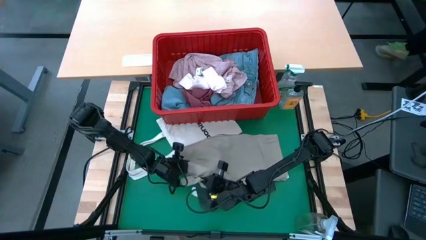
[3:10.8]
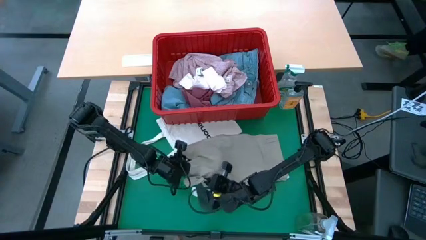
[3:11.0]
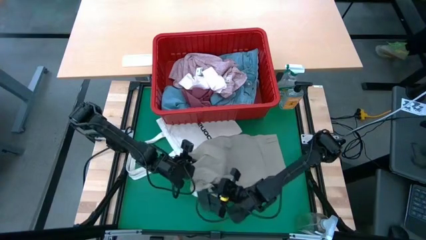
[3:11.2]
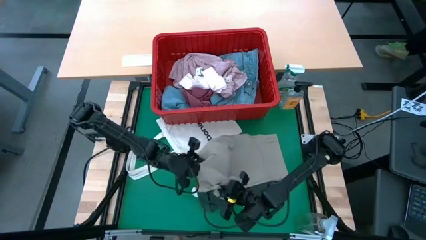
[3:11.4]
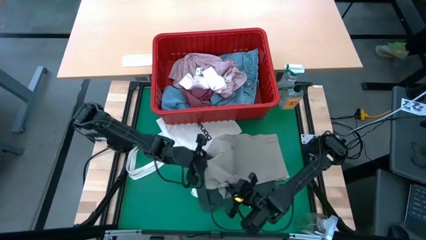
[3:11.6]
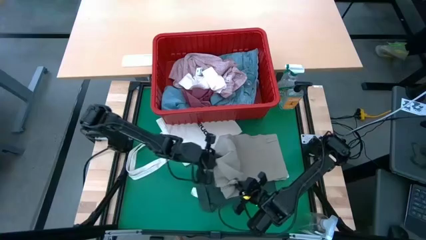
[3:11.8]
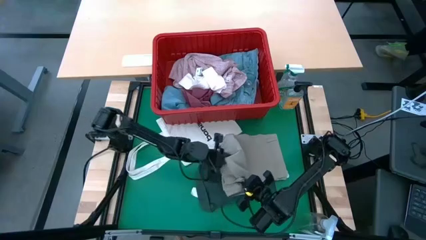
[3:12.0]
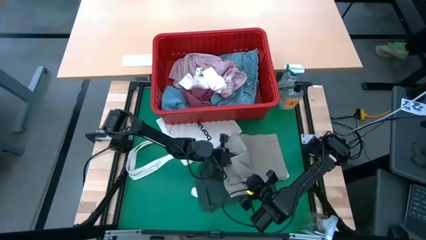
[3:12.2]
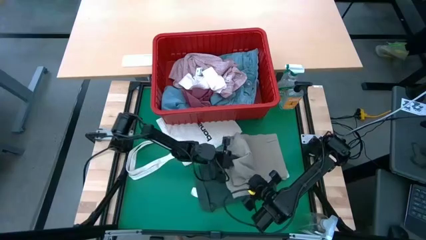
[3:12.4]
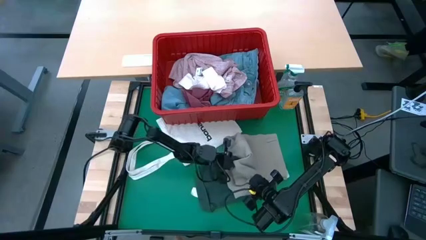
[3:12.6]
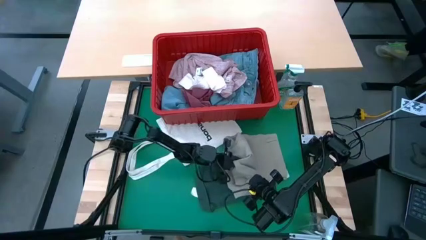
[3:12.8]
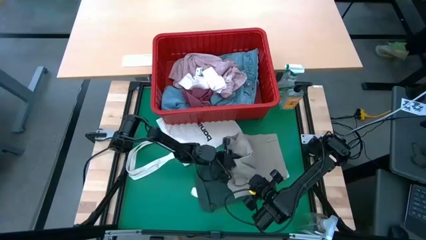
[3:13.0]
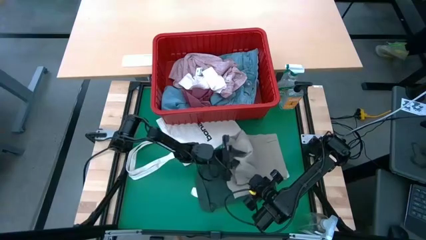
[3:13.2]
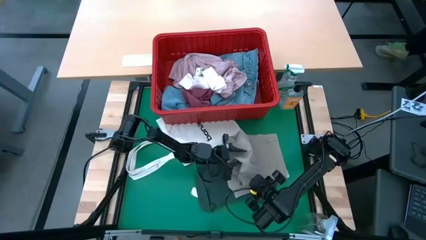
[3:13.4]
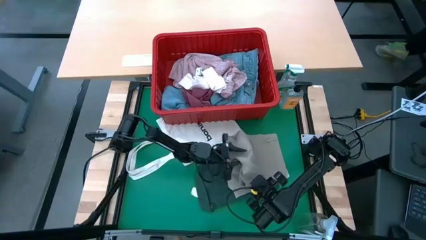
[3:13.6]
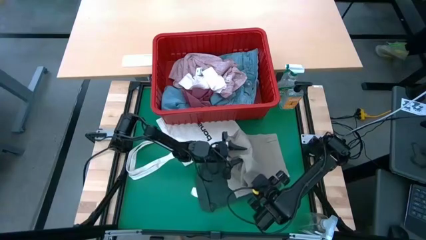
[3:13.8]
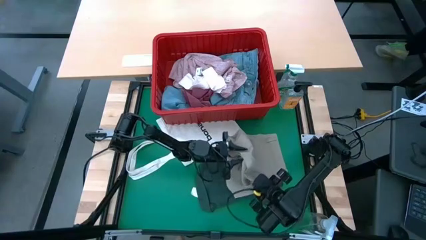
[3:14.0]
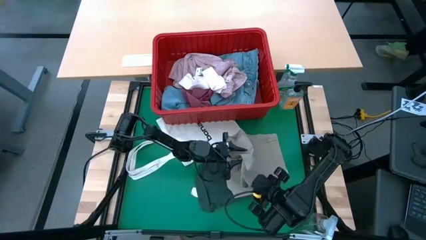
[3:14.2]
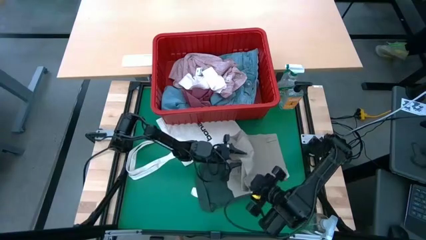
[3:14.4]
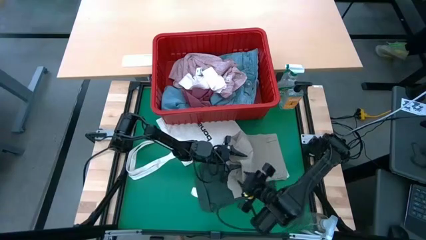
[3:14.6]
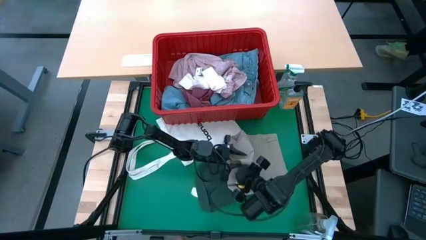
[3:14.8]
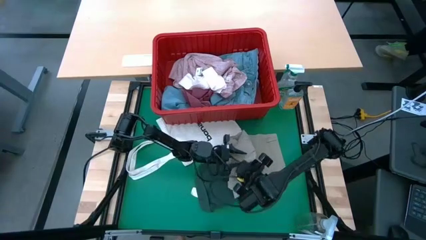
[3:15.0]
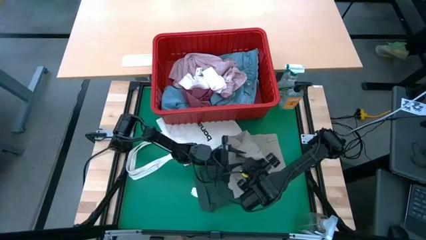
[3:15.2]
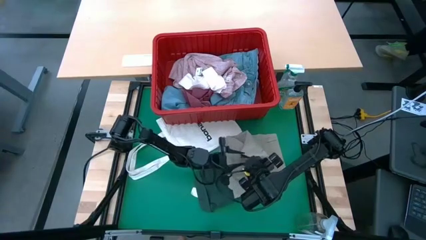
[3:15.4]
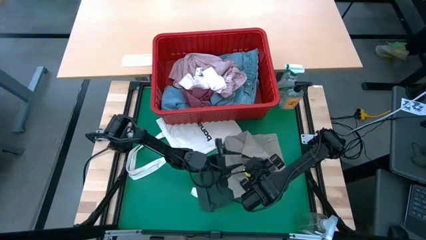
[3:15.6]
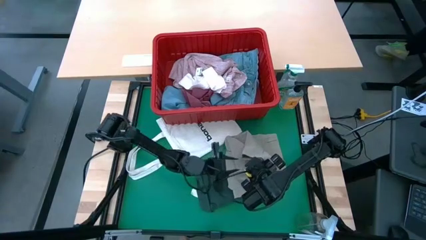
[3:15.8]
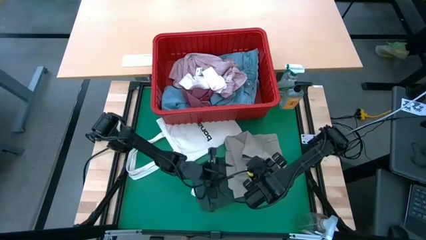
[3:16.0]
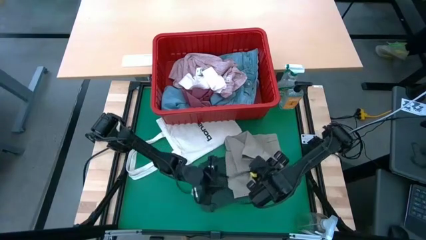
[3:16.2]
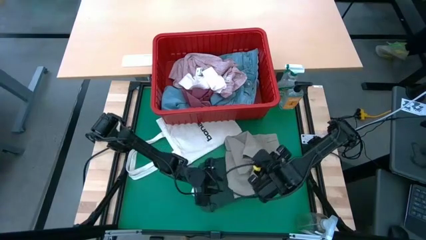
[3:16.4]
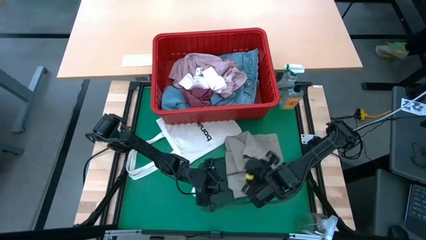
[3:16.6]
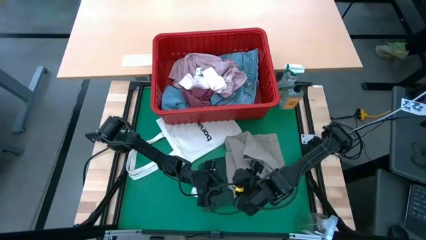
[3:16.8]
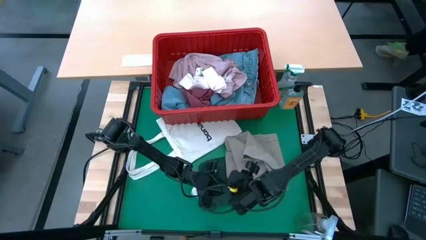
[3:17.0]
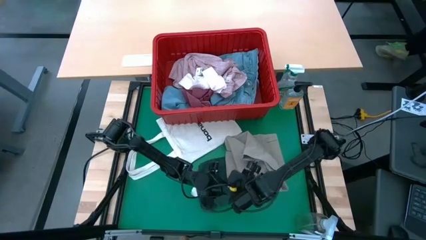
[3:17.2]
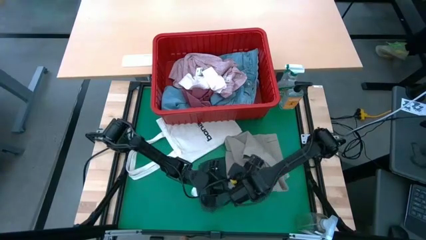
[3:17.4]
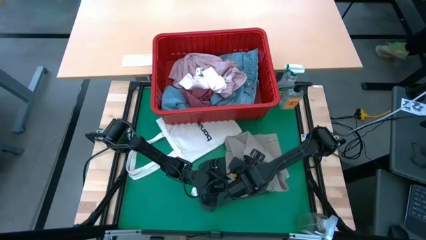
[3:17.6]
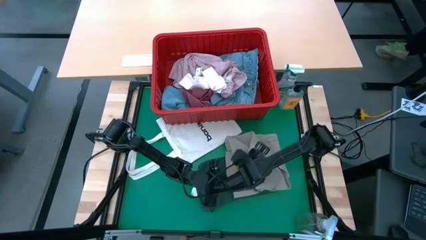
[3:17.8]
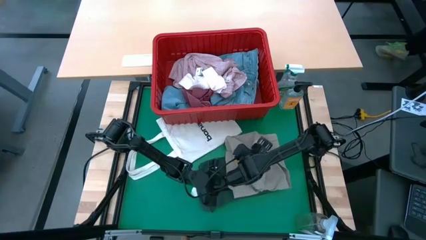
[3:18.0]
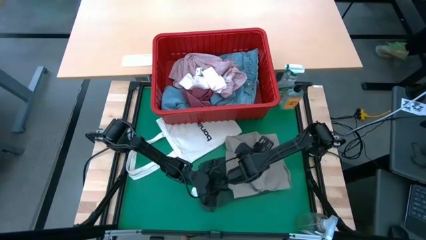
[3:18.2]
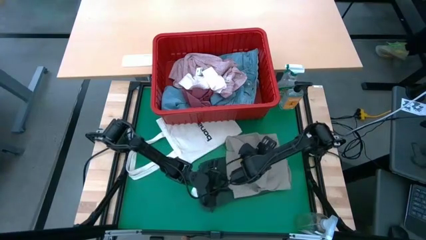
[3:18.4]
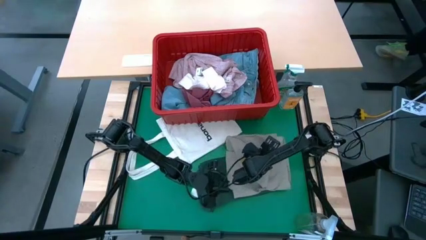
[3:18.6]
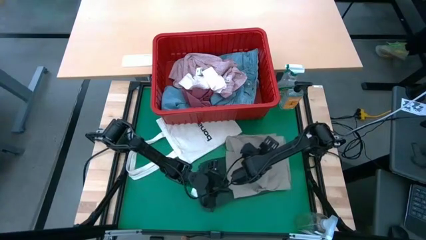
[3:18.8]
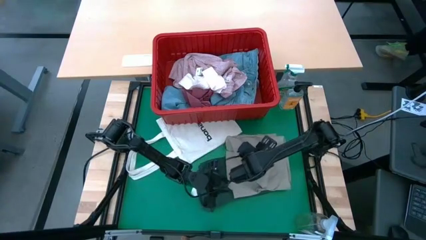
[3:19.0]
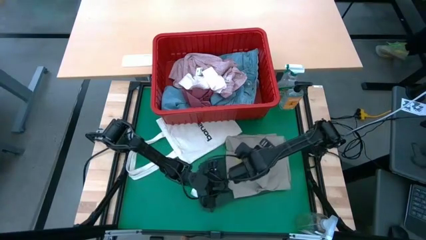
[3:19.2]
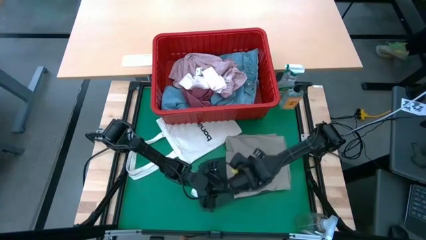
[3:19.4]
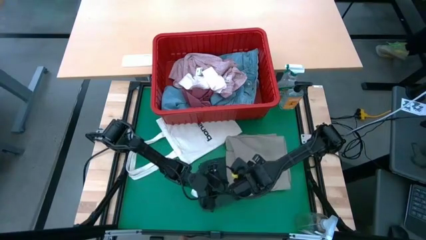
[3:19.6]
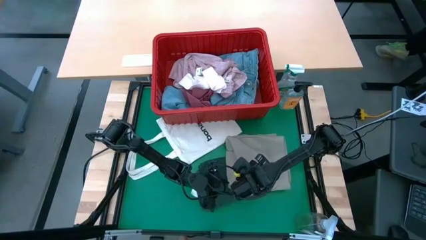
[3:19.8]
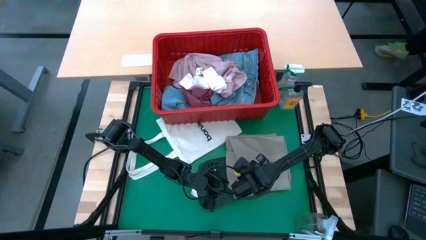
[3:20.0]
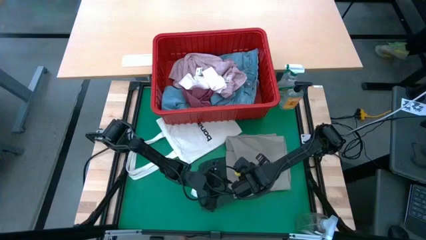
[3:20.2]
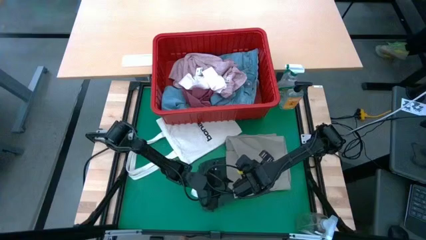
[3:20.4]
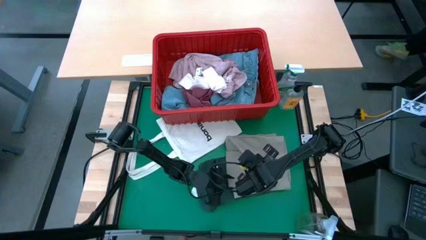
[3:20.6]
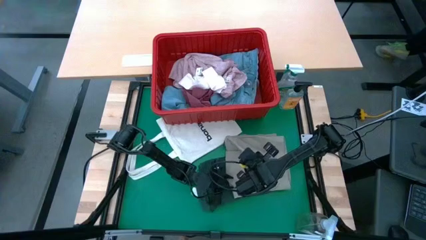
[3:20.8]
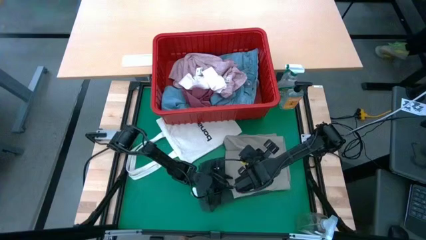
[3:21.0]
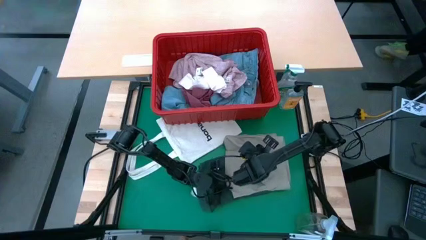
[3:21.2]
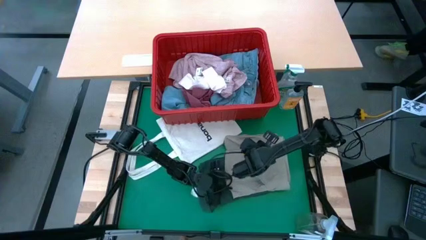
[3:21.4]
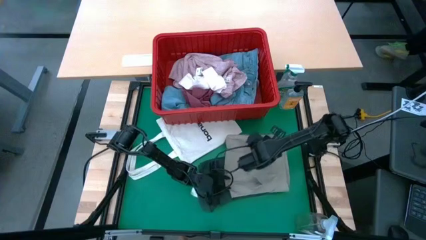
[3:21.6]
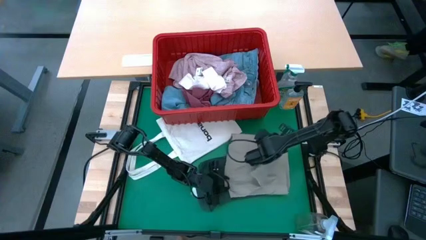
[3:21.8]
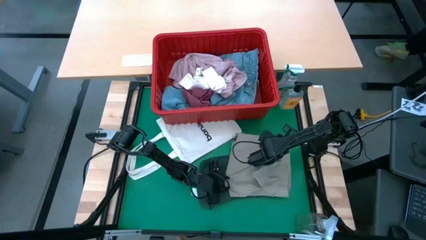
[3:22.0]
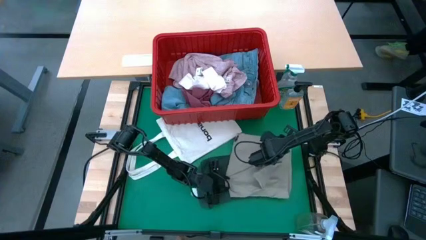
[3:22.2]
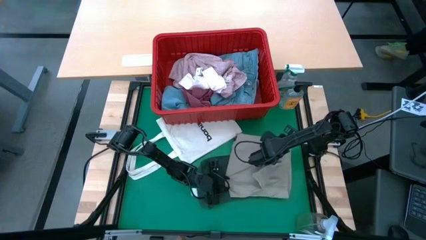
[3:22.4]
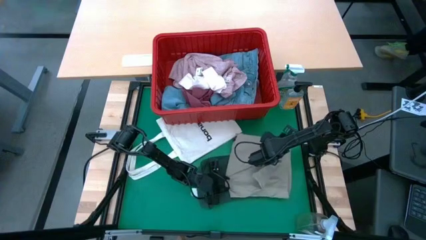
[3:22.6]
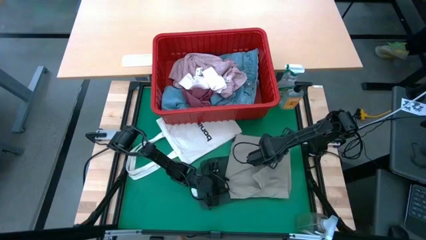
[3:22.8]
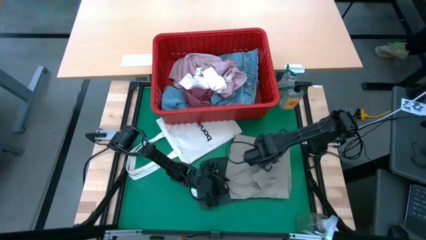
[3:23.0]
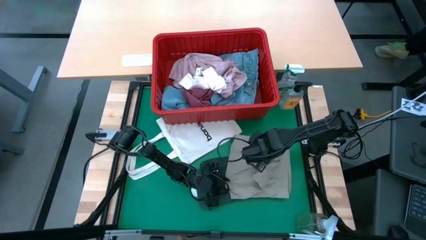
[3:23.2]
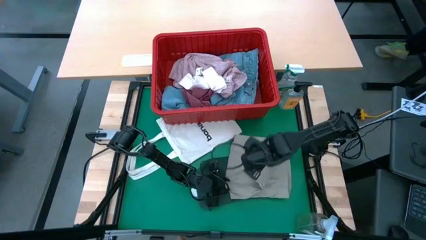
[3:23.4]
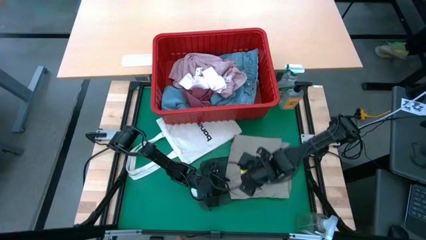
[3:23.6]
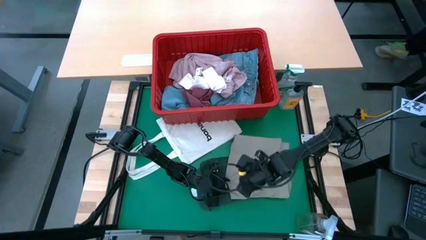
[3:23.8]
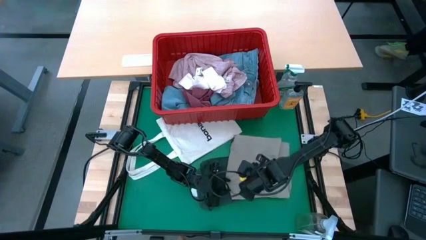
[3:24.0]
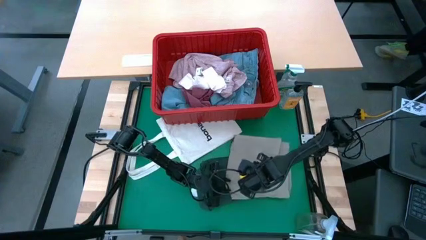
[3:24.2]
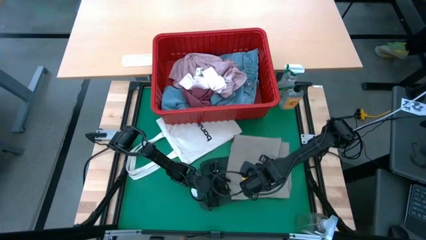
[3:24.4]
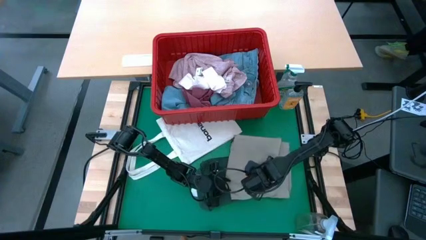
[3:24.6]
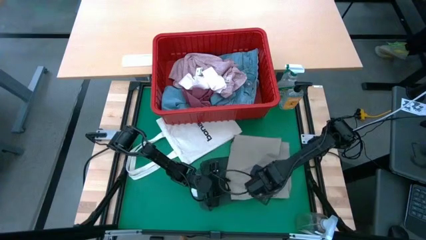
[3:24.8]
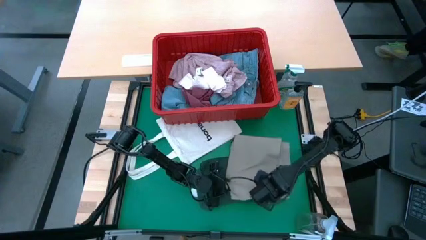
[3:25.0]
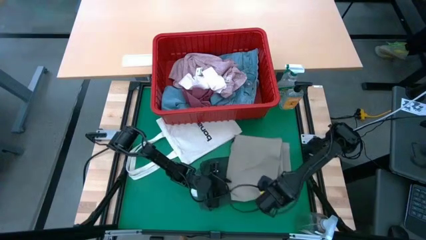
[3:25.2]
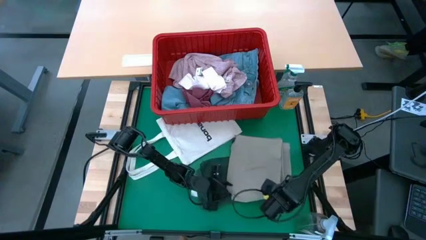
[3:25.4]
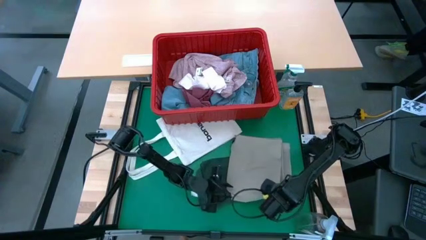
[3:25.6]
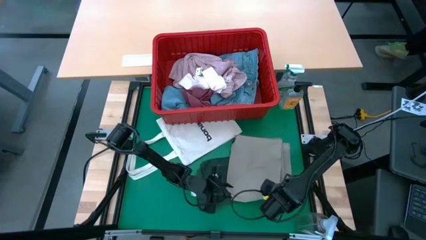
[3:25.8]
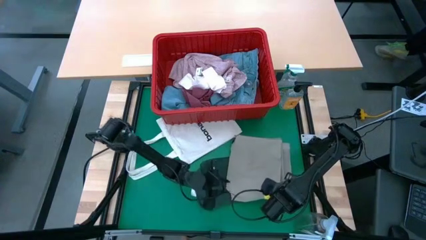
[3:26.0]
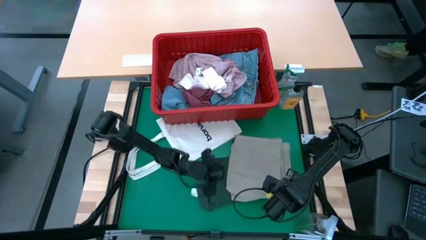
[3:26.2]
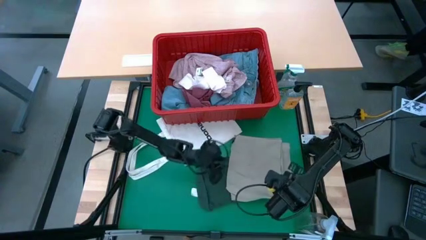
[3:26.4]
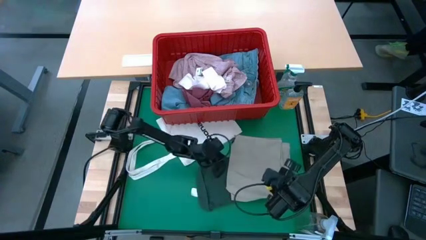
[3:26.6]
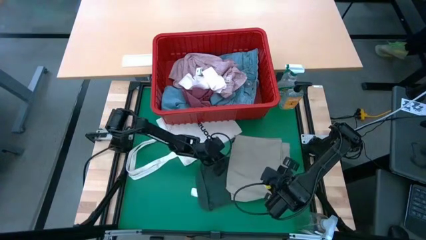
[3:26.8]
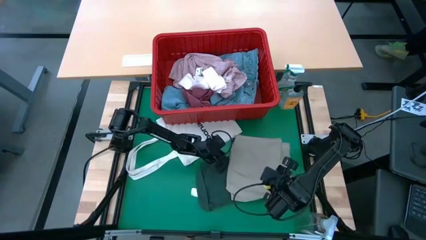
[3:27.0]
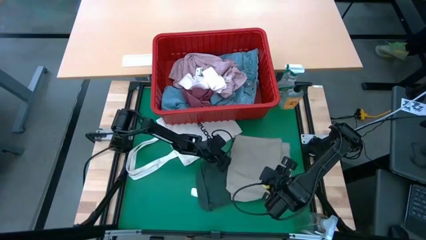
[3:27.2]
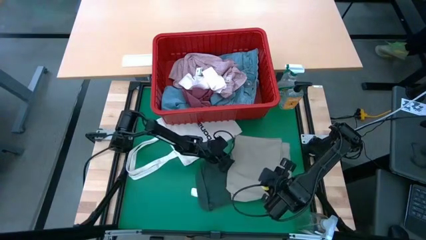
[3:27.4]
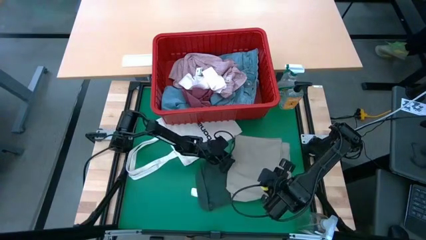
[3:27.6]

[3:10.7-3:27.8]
Task: Fold laundry
Fold the grey shorts
